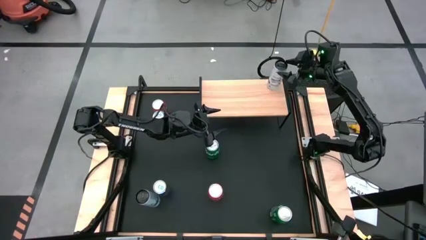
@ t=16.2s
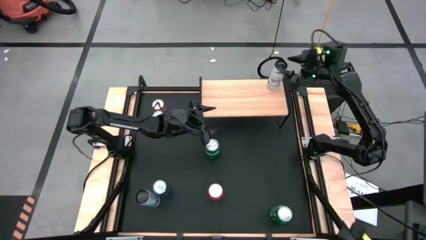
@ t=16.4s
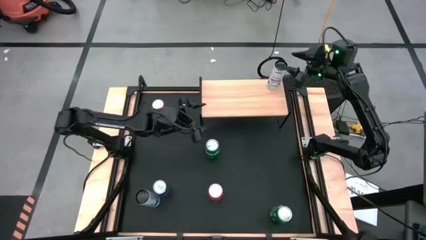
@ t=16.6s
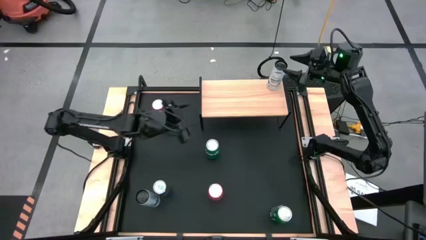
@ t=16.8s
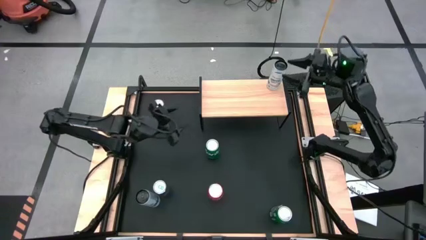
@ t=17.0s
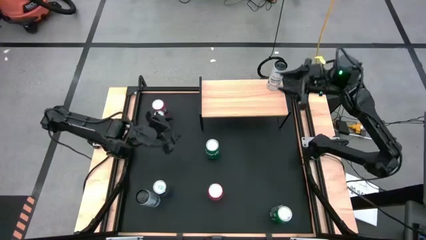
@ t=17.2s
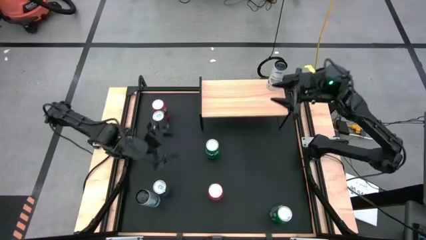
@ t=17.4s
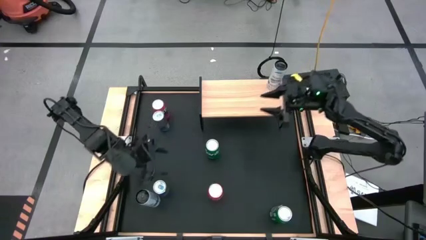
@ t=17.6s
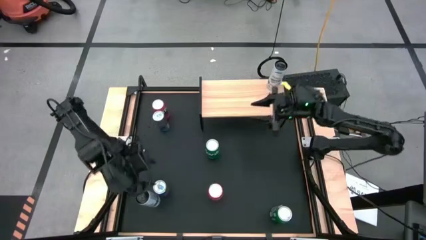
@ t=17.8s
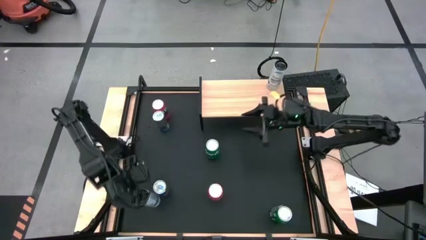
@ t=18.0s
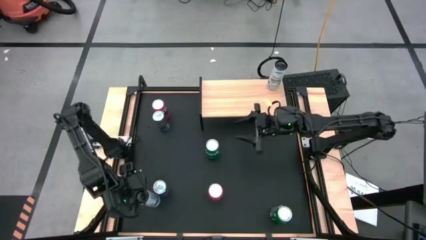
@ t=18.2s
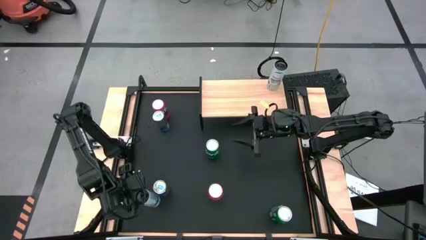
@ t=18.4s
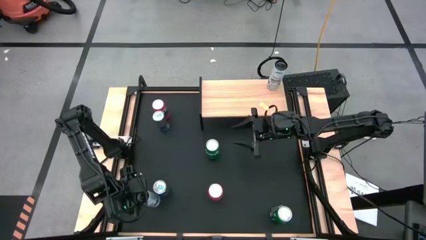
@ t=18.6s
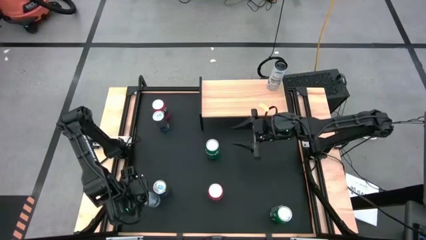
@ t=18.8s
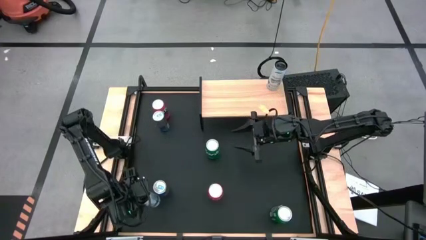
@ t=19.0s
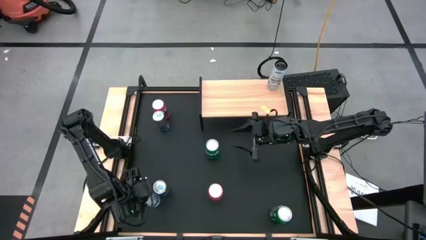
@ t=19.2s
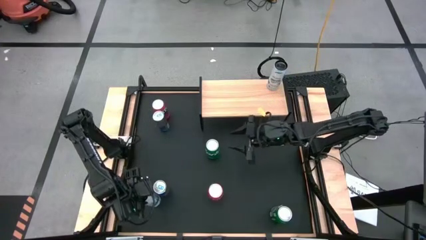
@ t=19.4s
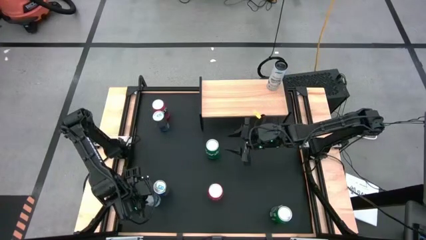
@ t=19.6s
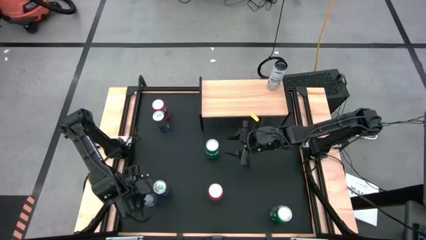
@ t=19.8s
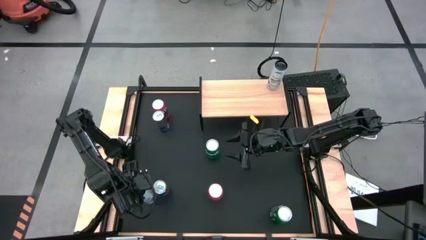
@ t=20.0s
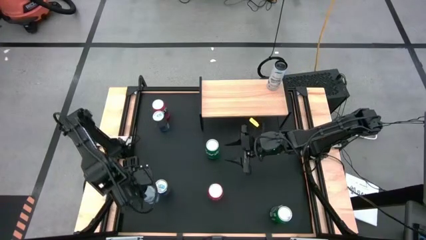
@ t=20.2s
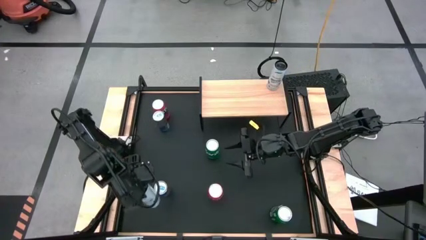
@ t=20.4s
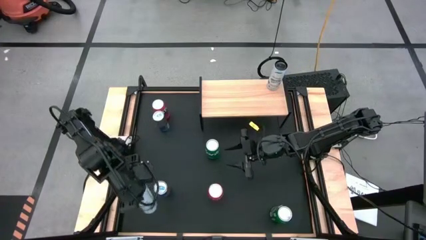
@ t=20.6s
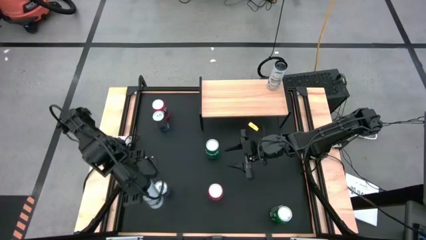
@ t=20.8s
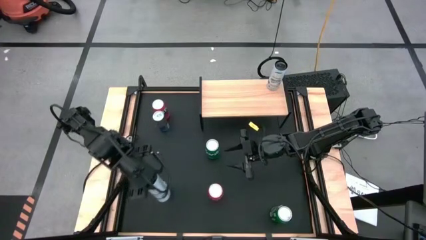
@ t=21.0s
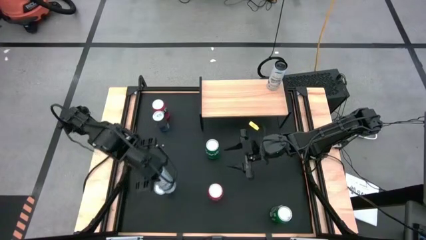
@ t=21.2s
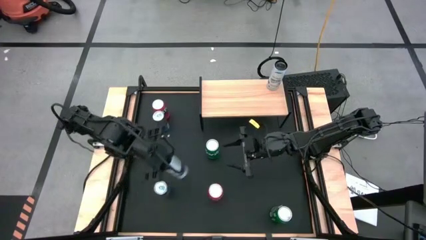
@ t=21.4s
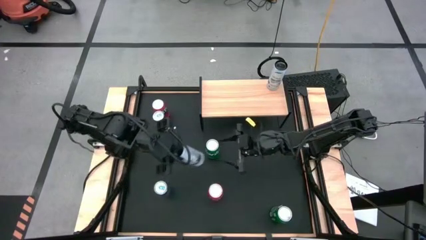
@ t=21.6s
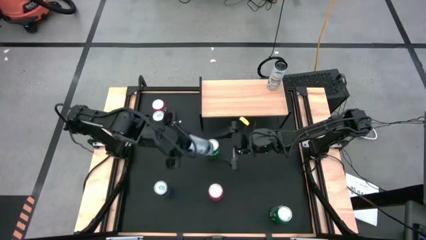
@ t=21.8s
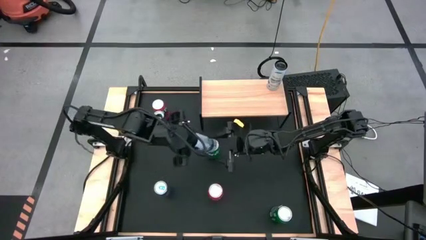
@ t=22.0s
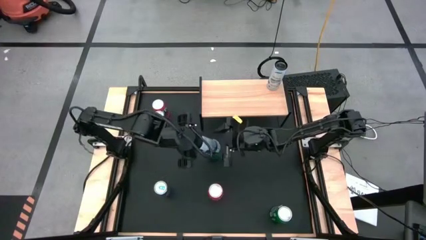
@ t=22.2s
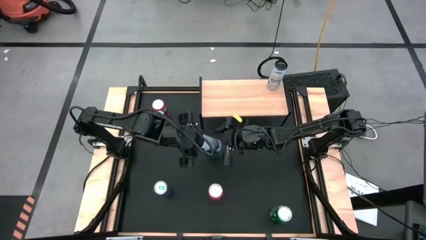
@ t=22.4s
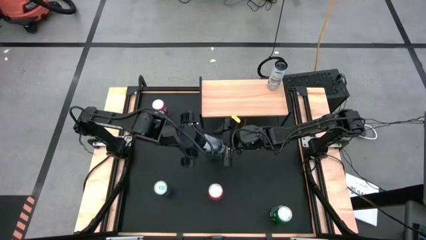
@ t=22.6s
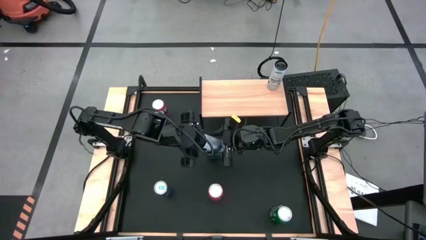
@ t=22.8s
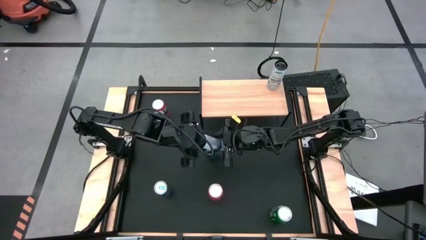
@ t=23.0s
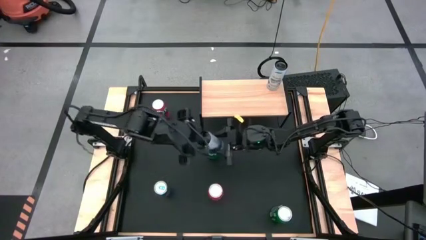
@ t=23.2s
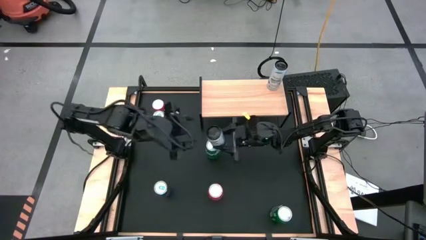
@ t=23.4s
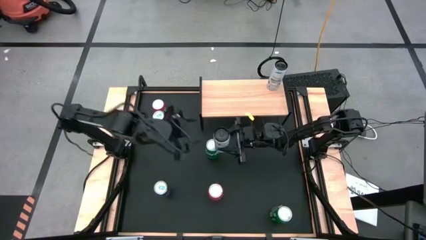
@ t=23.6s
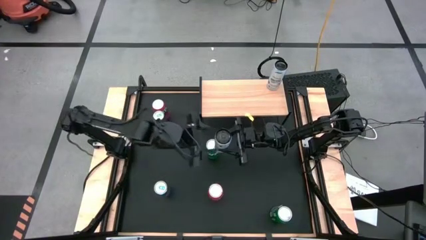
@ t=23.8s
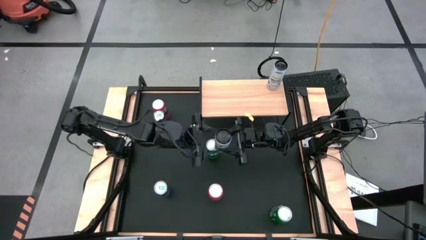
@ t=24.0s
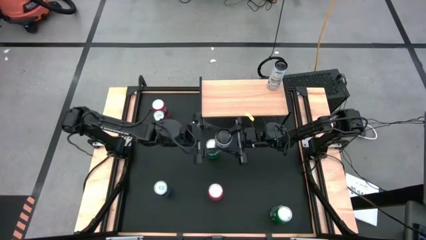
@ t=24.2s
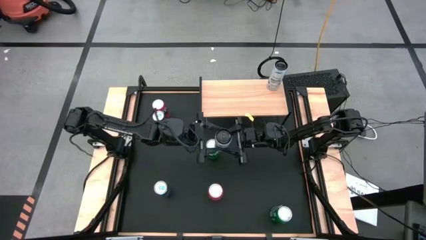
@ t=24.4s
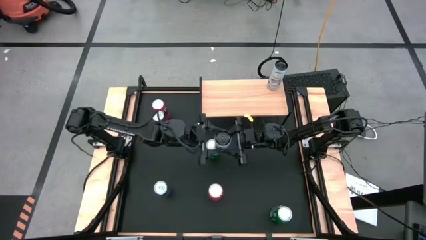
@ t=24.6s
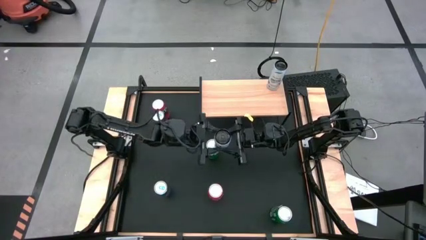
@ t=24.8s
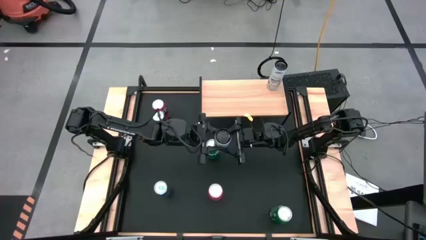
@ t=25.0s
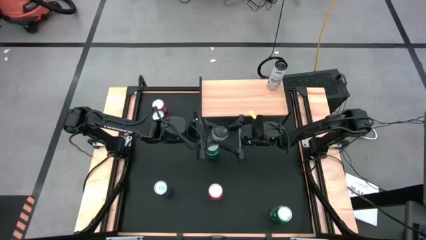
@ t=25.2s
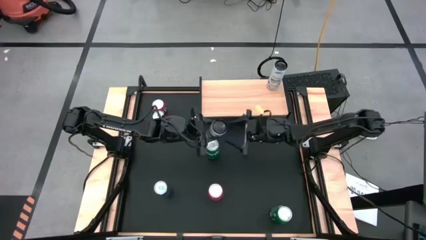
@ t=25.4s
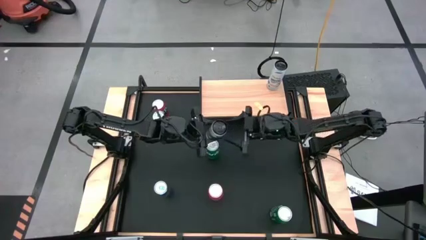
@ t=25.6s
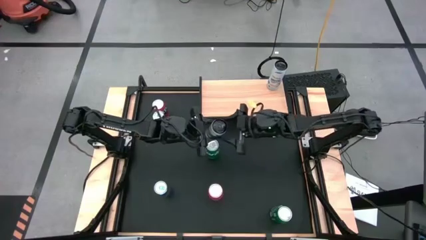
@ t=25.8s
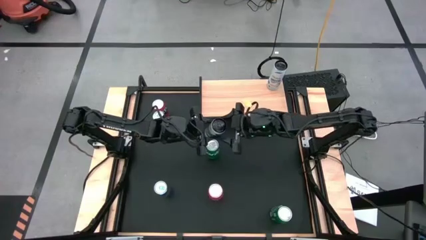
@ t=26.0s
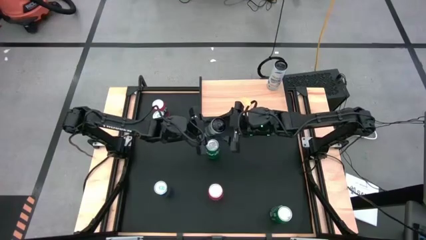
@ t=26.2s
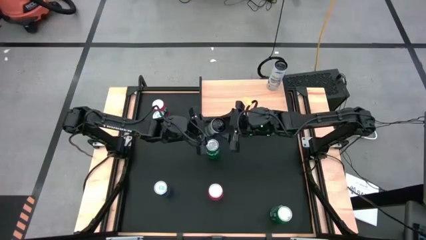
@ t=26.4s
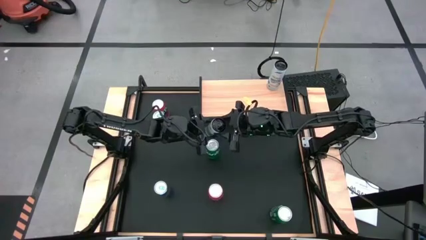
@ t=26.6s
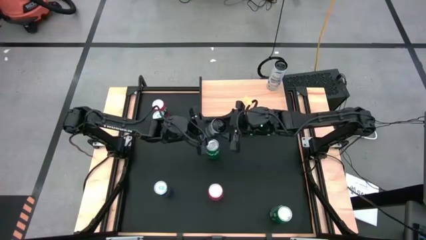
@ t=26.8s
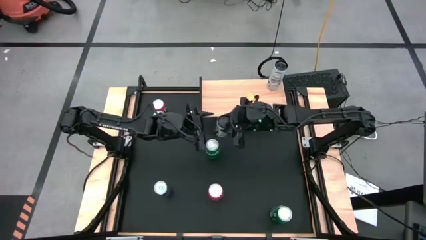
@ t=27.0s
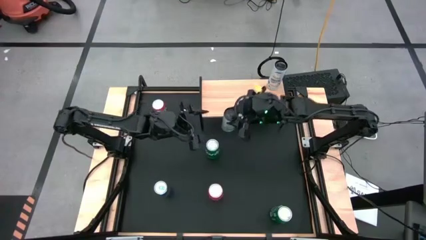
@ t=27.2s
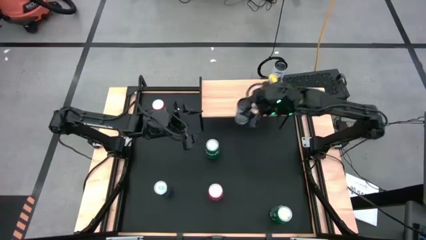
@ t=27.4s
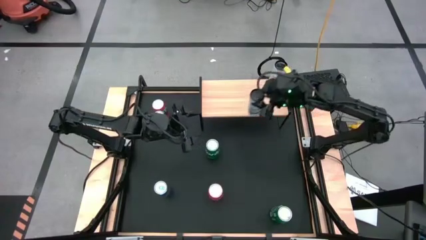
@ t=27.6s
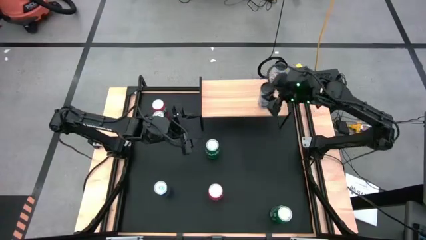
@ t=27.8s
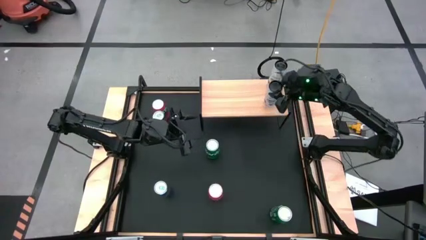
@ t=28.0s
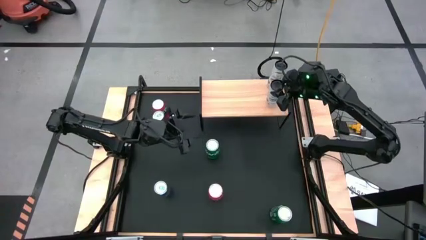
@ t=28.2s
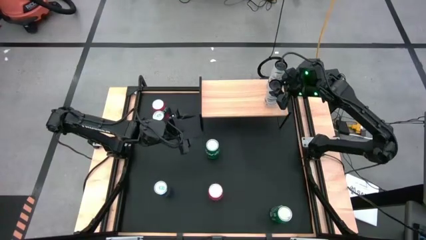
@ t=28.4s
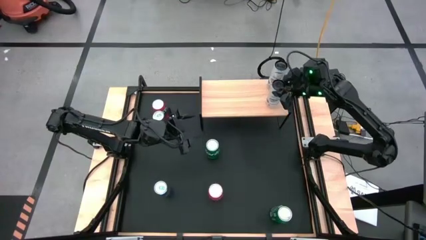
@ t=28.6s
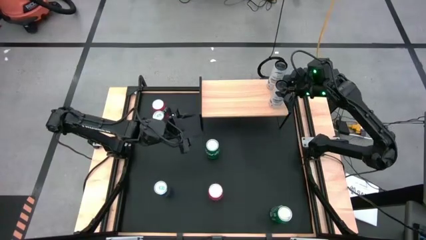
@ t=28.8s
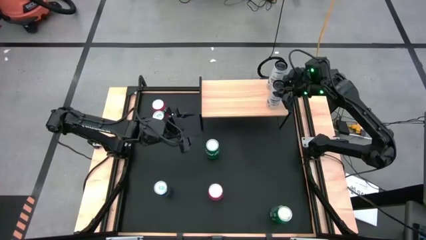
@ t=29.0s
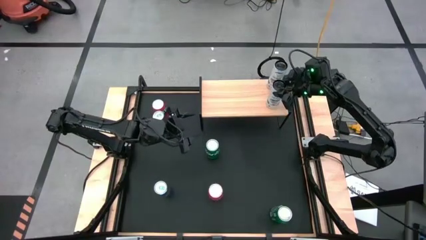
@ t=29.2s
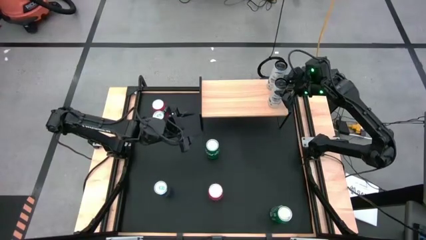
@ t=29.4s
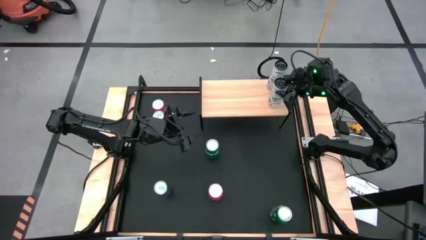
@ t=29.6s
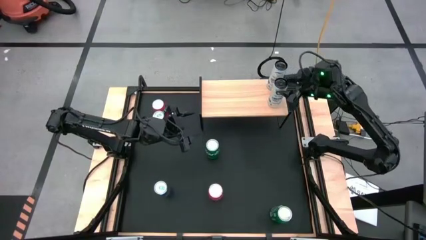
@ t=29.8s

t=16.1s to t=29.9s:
Task: Place canned beverage on shelf
Put the white soda can on the shelf
